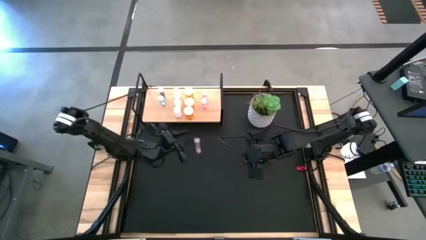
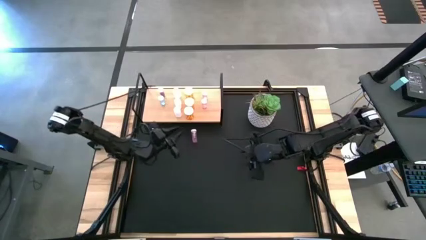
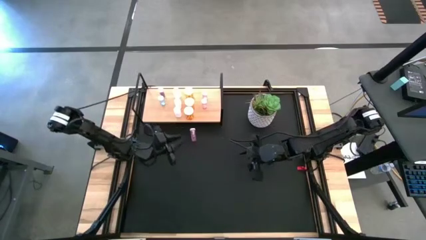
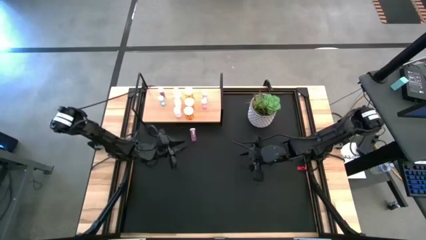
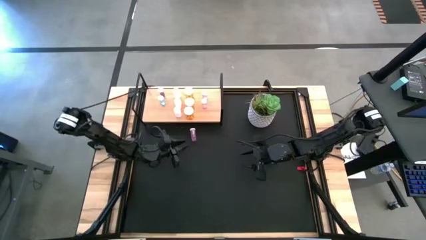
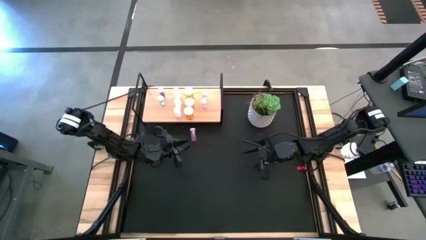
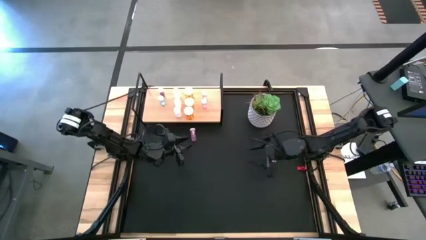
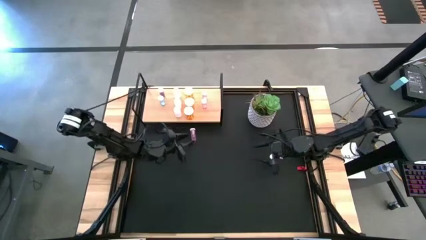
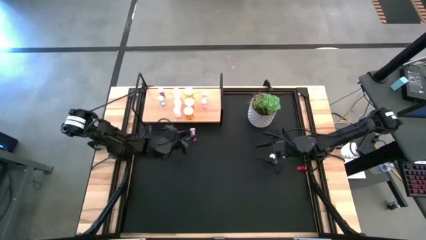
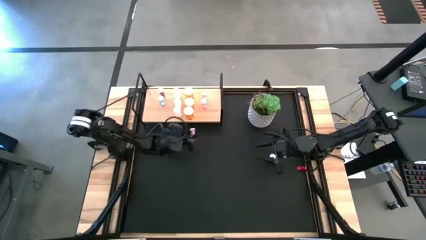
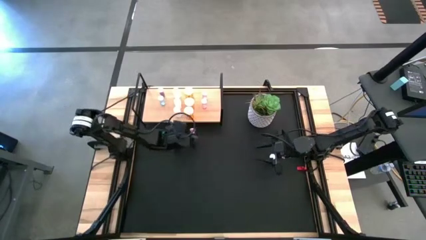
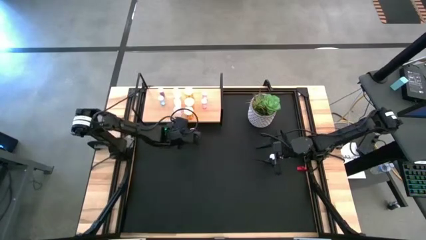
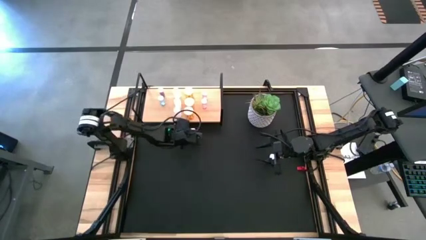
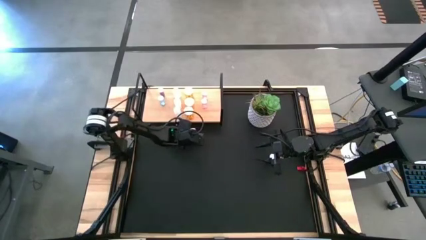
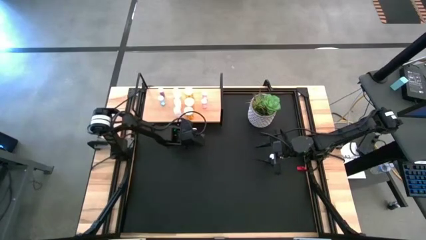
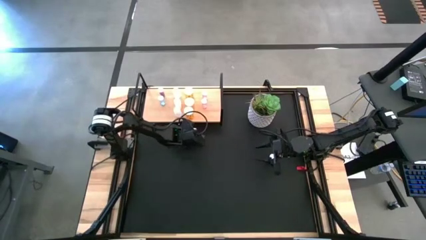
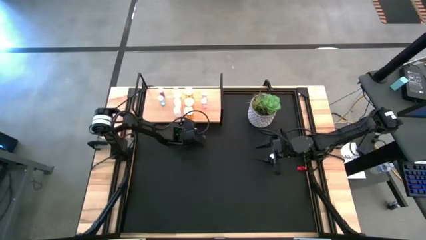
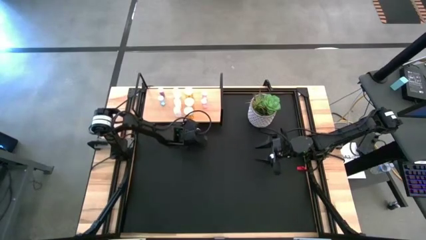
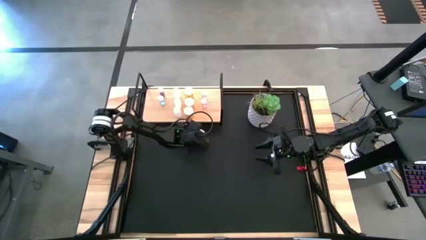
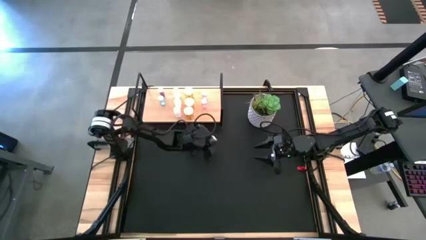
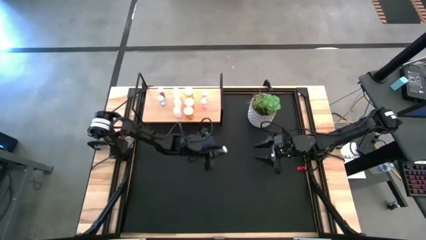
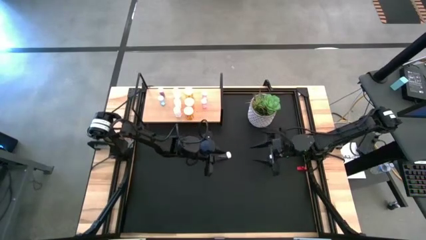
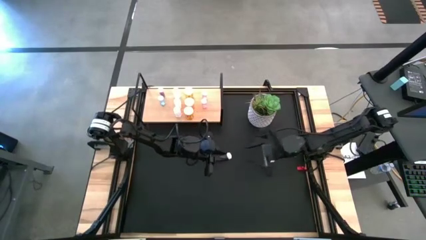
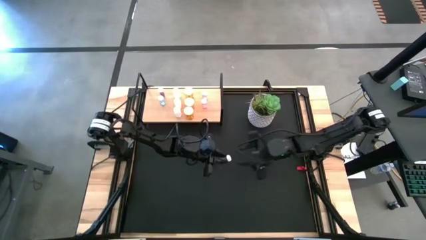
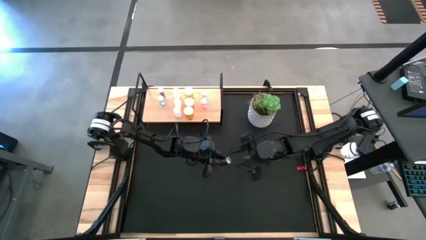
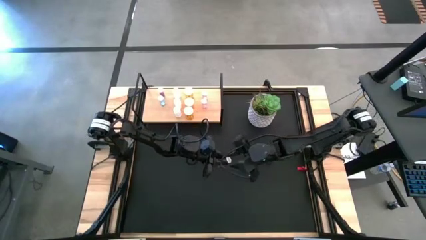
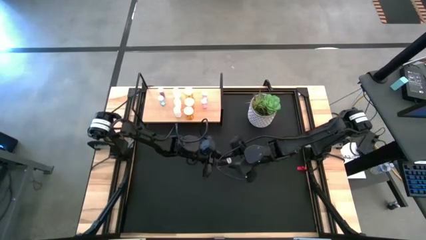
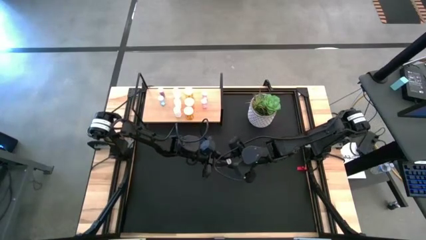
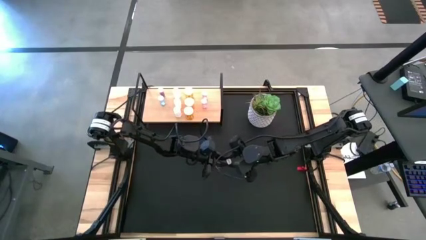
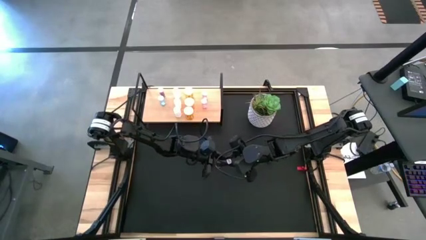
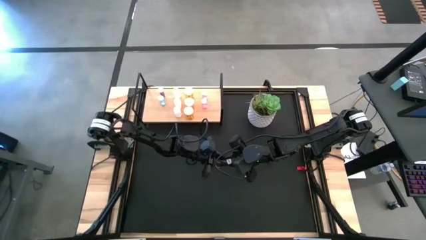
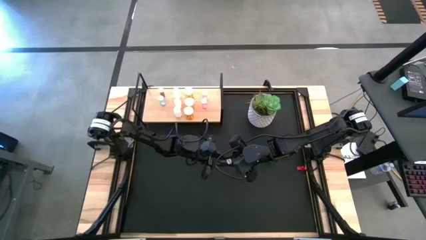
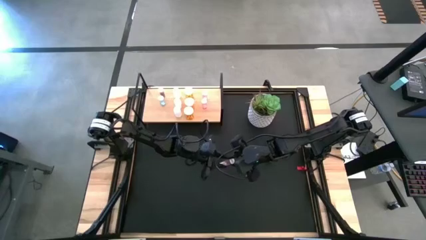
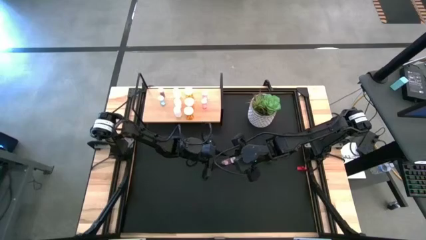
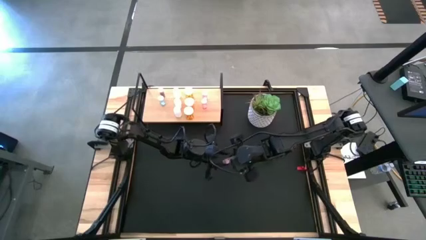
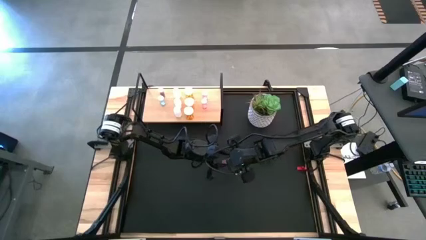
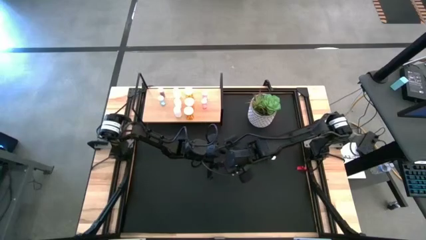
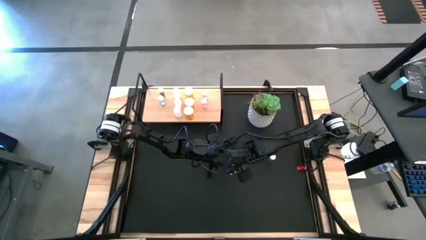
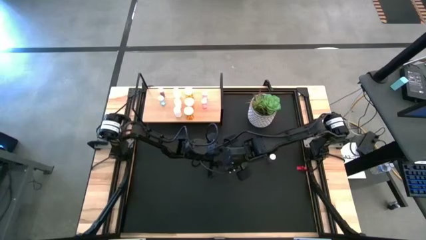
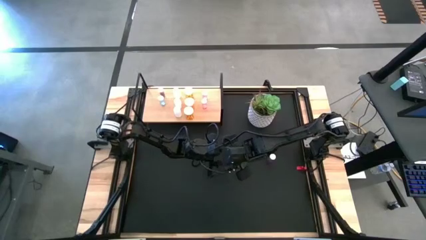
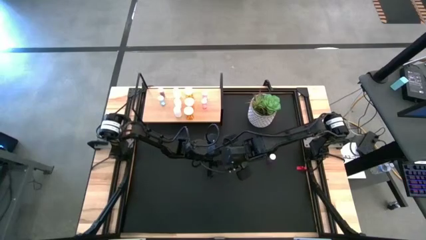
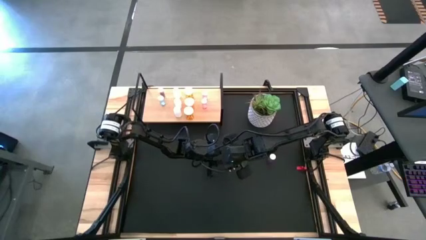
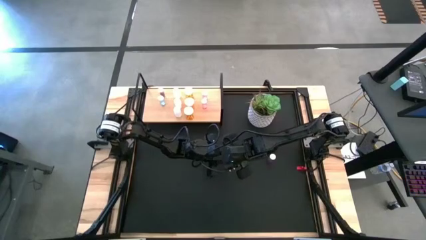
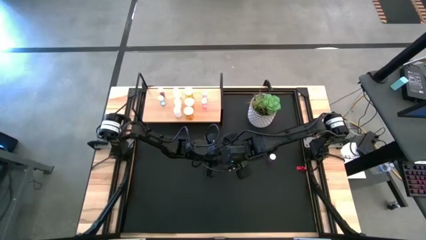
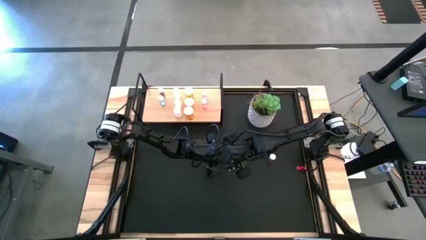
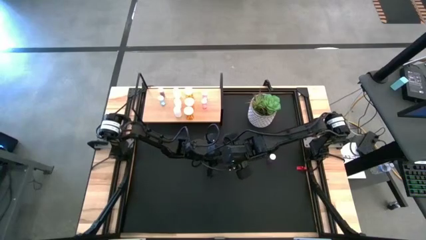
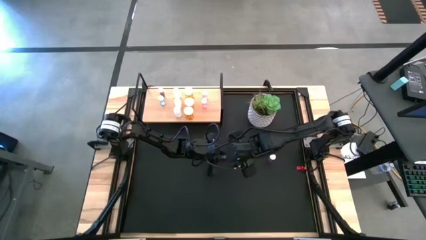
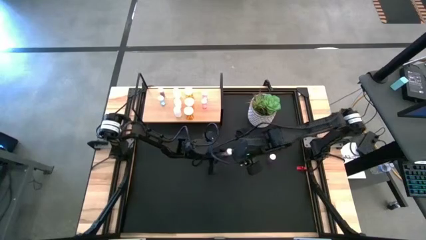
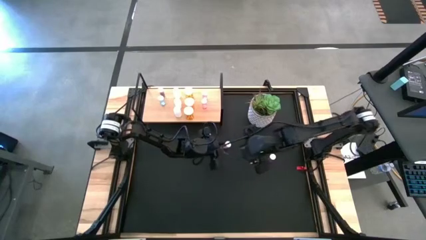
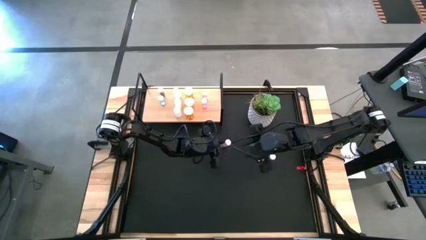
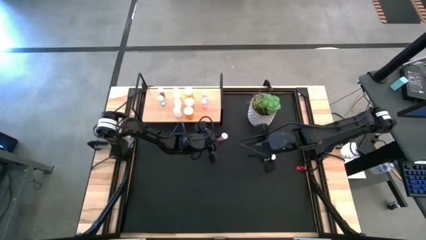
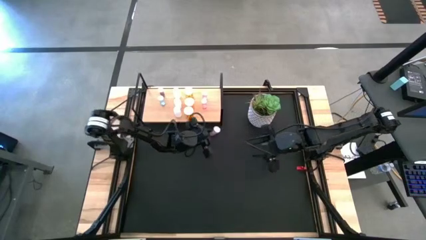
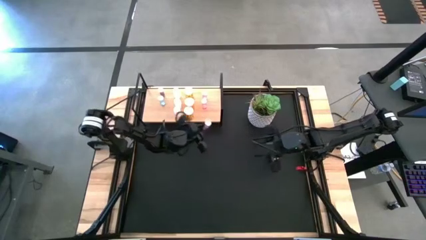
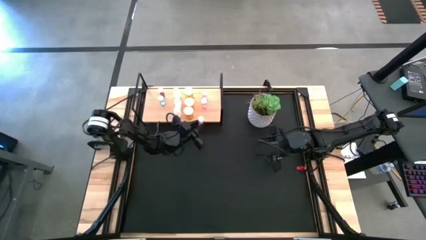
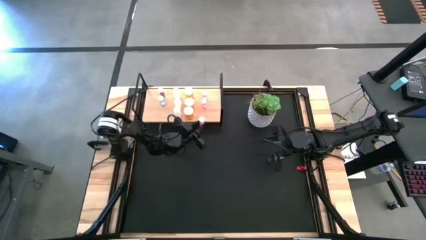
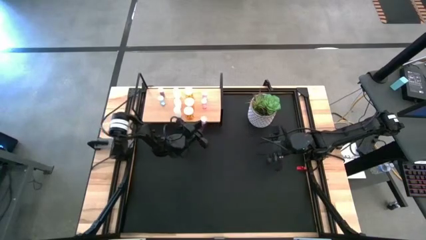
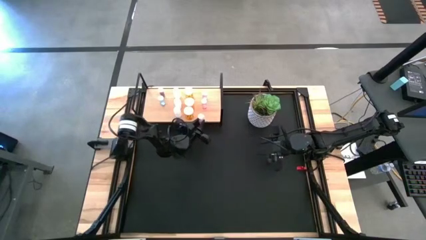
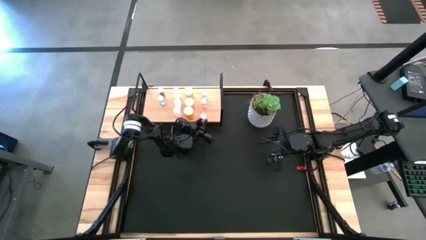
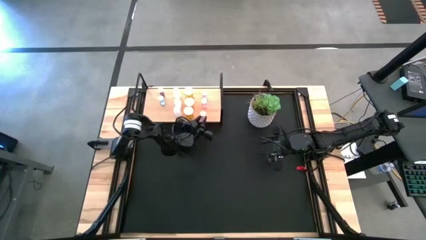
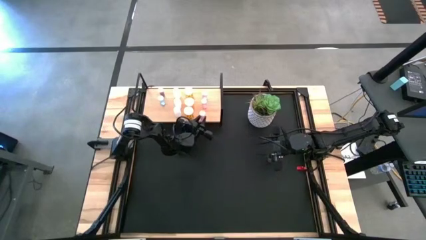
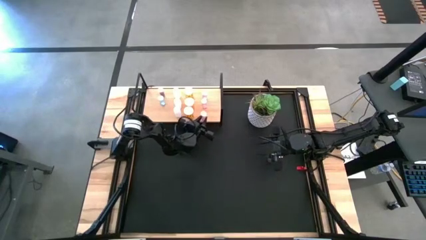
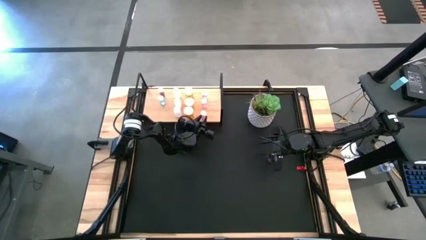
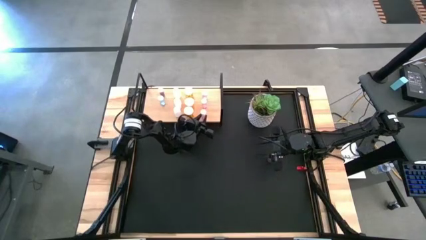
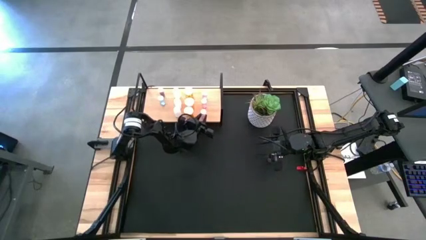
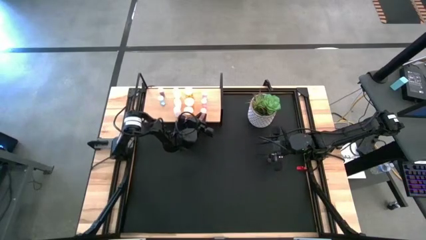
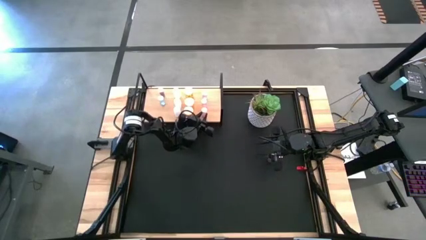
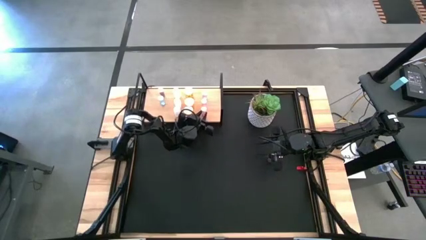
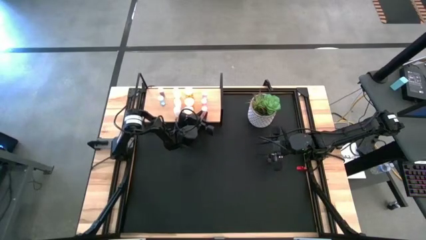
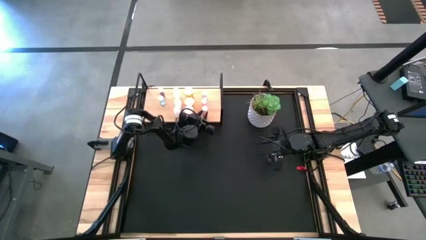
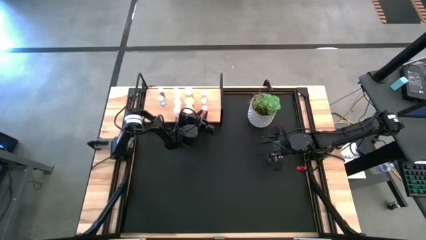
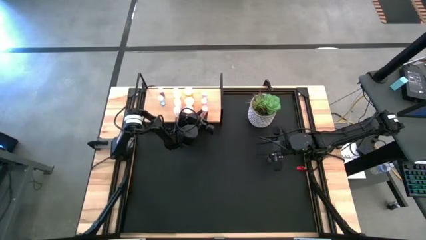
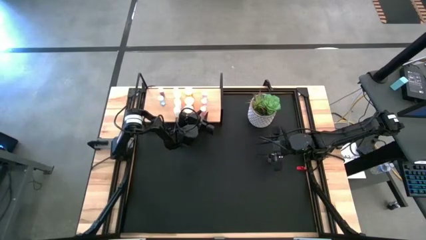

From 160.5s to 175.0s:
Task: Pick and place medicine bottles onto shelf by color
Put the pink pill bottle on the shelf aligned with the other pink pill bottles
